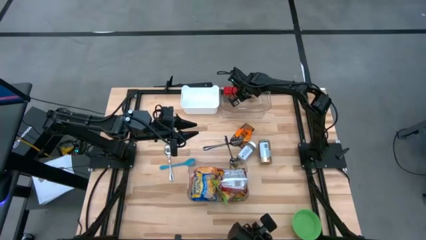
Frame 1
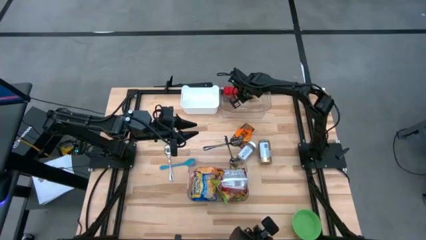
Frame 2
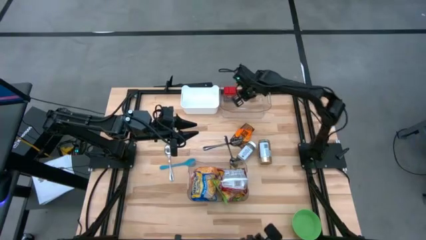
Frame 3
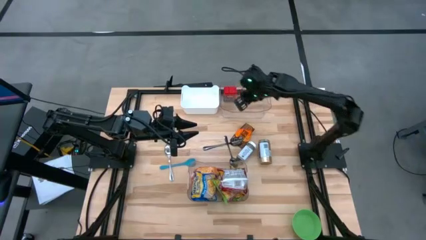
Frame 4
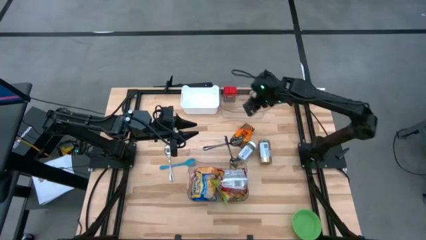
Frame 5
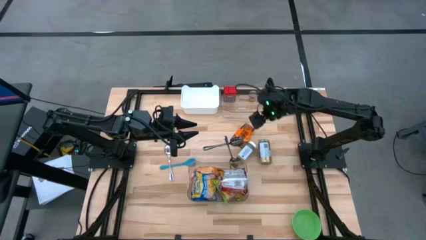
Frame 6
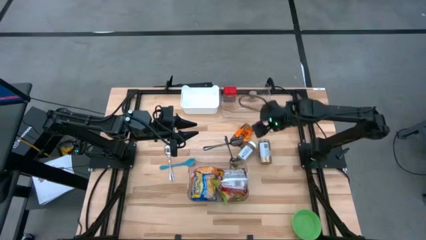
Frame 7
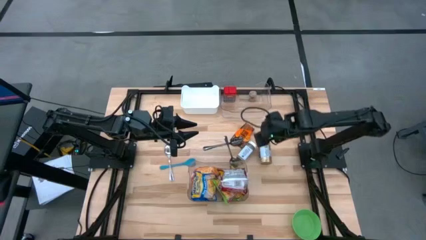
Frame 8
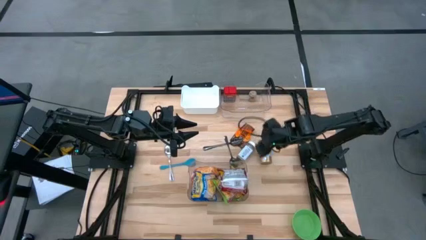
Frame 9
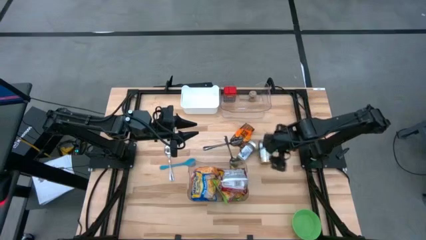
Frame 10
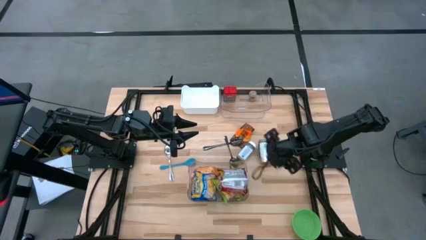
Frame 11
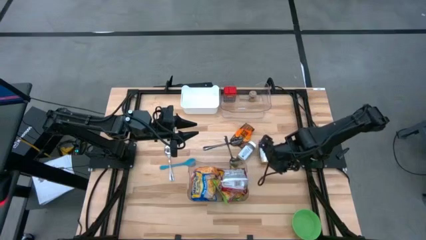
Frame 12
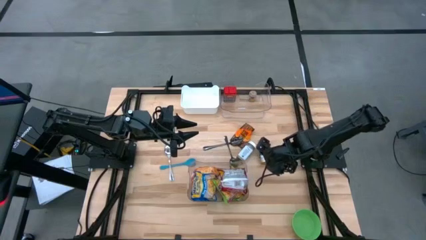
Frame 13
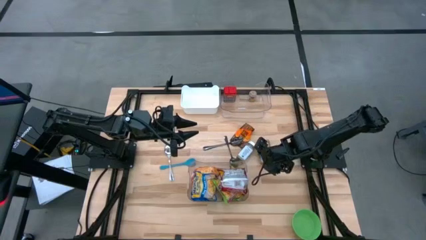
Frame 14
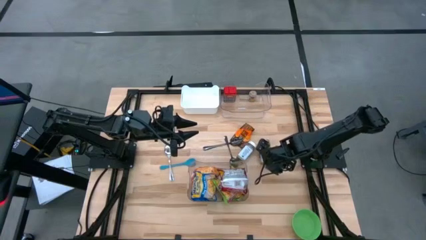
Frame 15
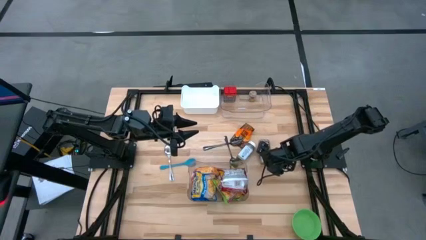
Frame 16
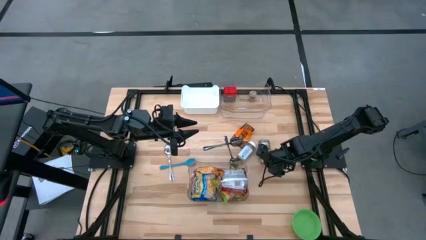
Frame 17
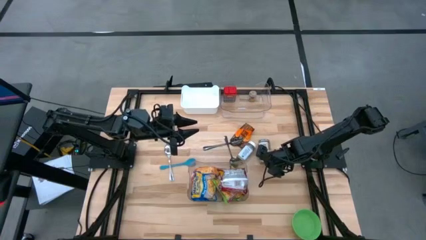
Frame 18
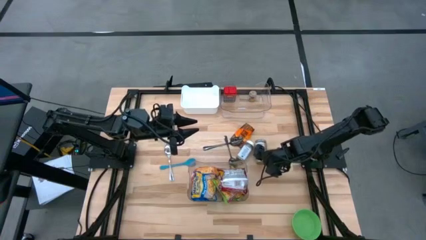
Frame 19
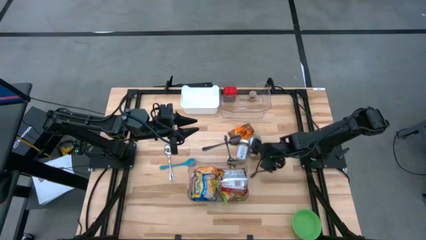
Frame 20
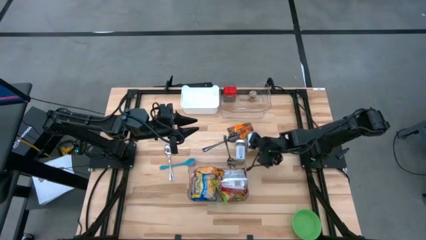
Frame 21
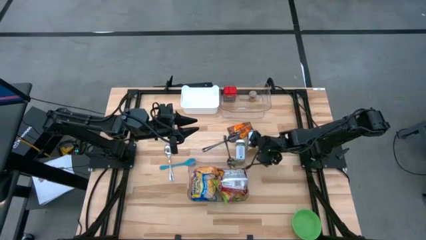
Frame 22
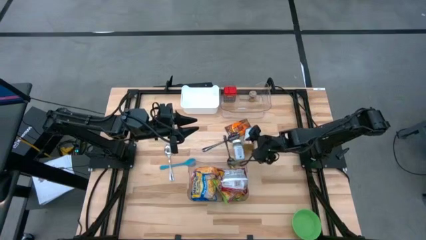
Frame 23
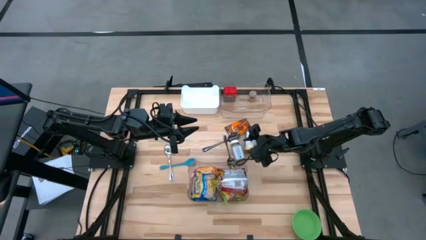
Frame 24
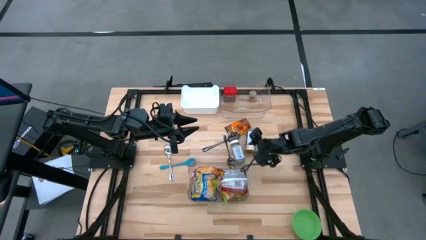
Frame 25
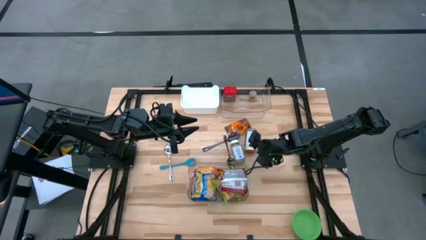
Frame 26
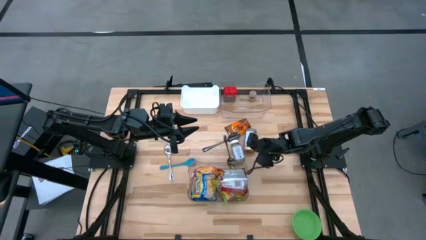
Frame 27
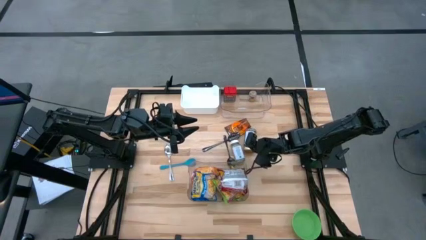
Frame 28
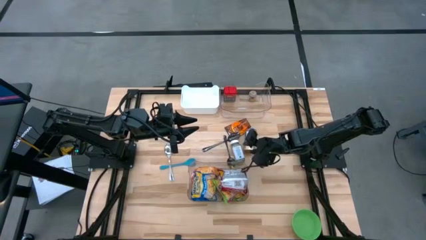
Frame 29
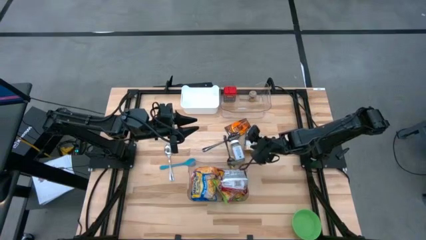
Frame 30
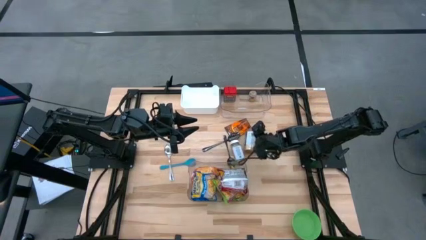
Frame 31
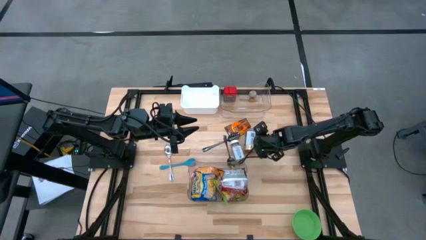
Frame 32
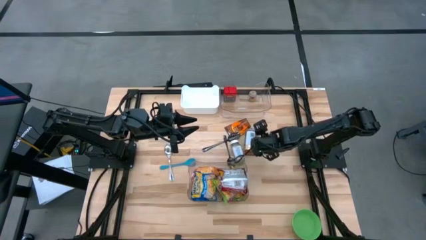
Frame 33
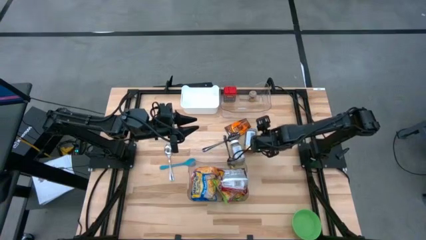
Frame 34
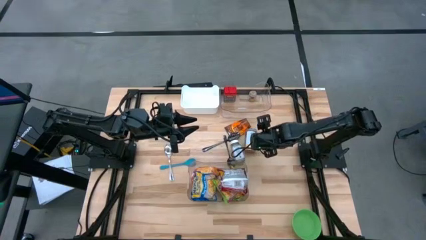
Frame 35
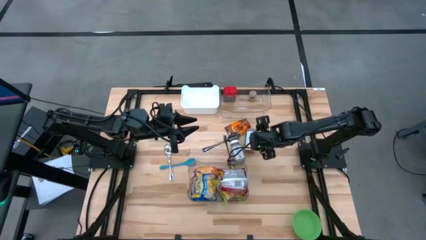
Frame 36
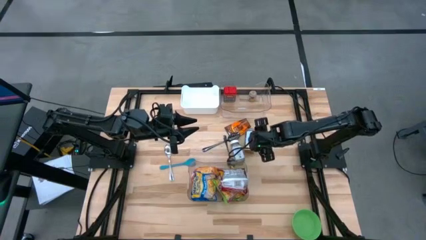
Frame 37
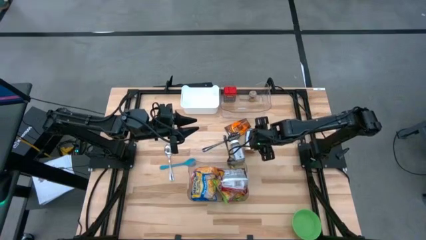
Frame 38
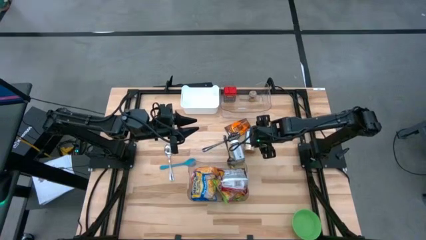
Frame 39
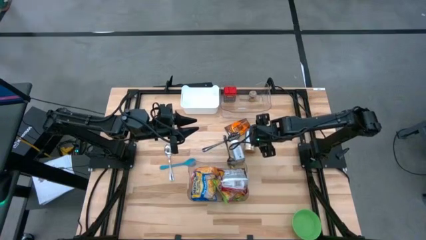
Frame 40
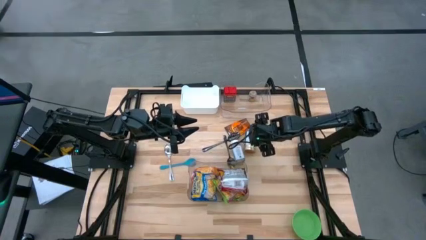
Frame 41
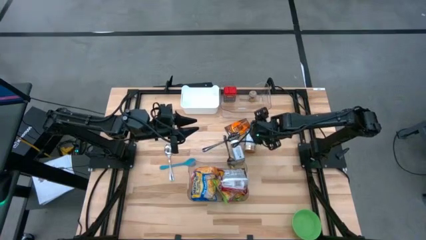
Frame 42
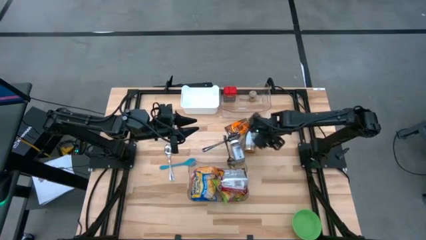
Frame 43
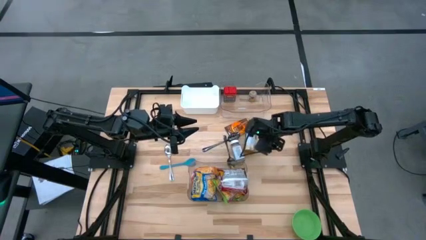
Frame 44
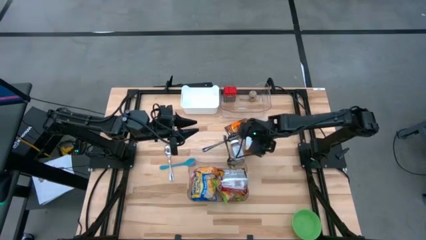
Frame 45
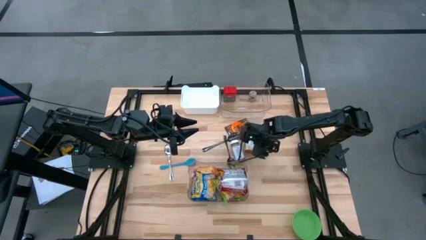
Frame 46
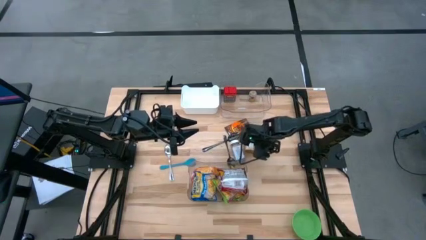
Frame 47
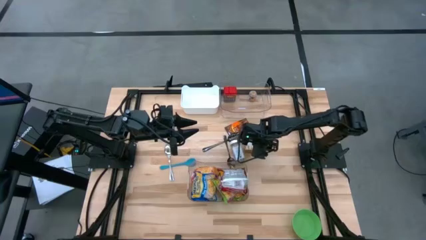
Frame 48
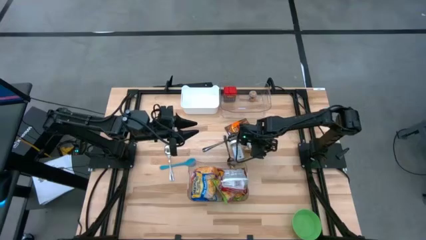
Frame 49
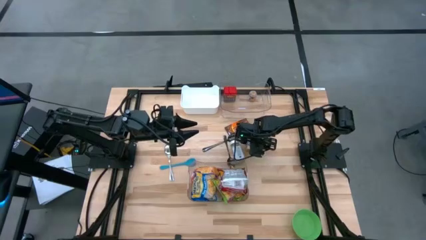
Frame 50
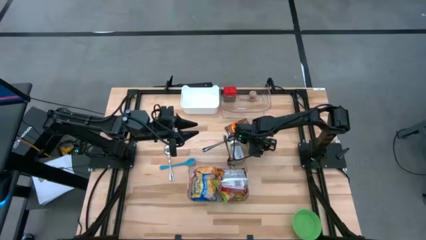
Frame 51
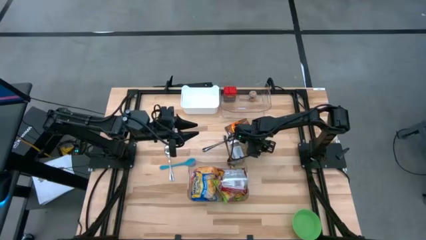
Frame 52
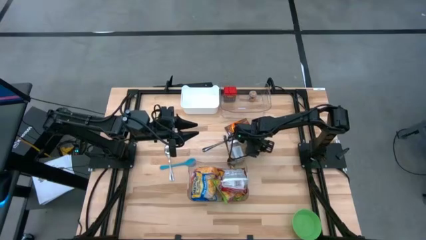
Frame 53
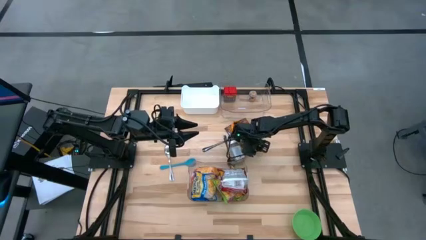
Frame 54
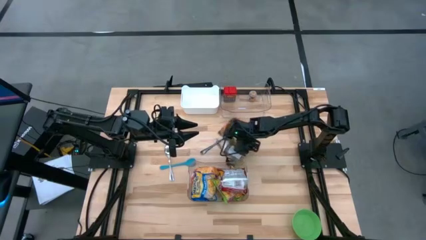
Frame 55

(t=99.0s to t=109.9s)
Task: Pick & Place Food Item
Put the gold seasoning into the top transparent bin
